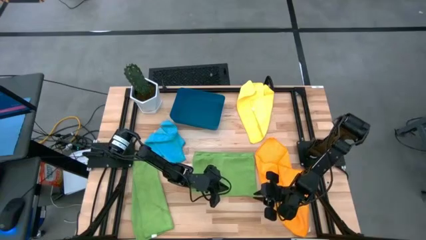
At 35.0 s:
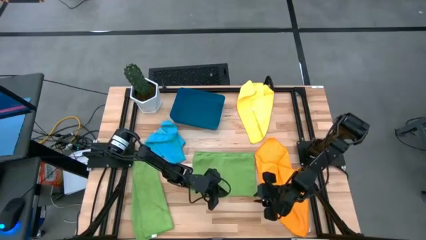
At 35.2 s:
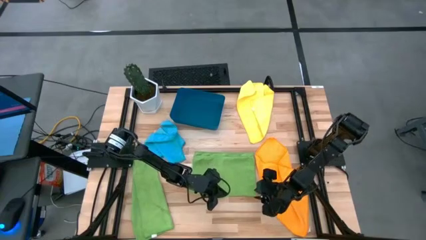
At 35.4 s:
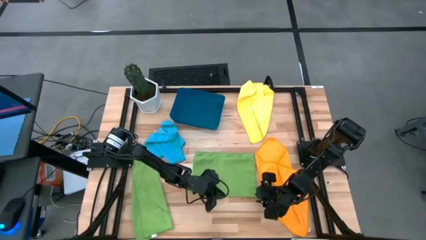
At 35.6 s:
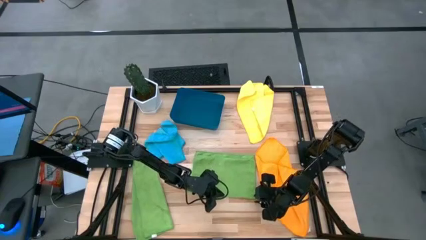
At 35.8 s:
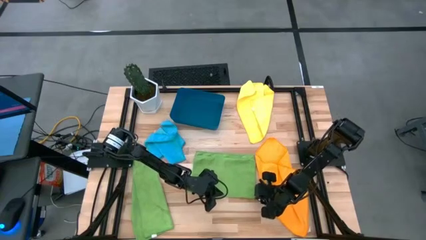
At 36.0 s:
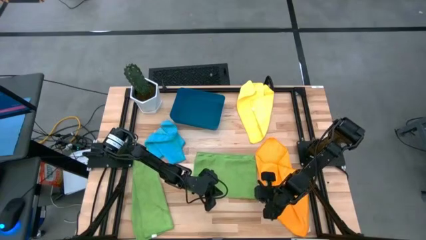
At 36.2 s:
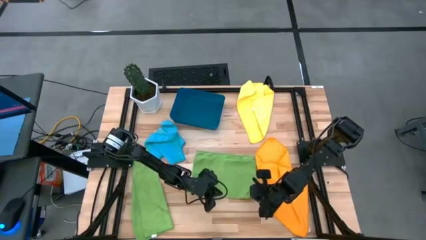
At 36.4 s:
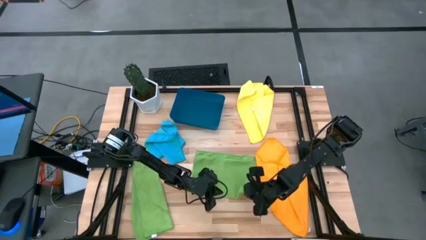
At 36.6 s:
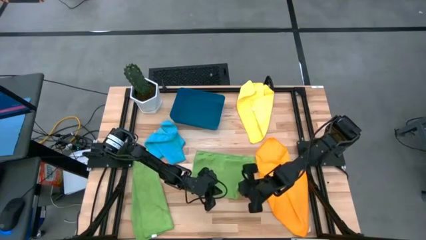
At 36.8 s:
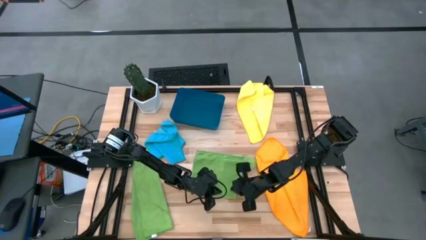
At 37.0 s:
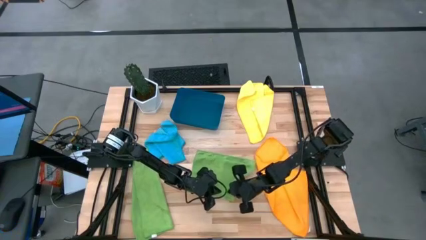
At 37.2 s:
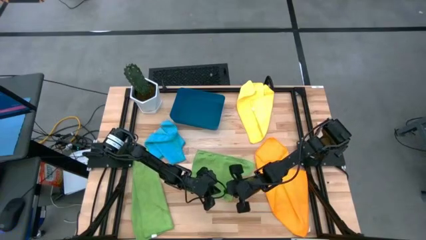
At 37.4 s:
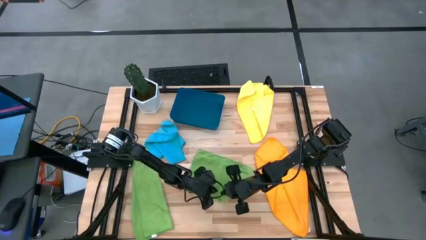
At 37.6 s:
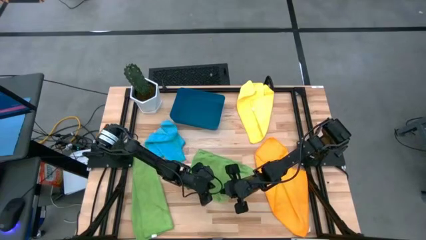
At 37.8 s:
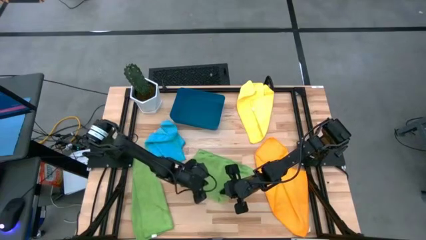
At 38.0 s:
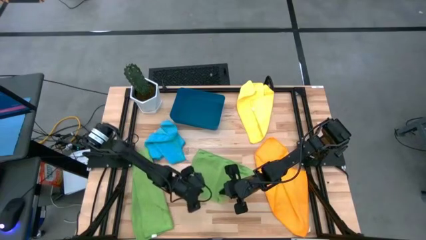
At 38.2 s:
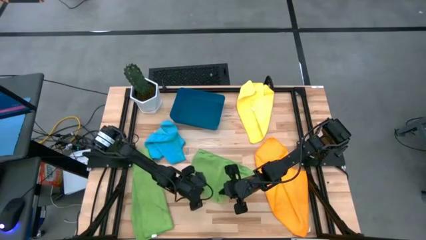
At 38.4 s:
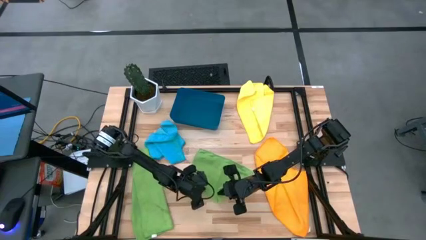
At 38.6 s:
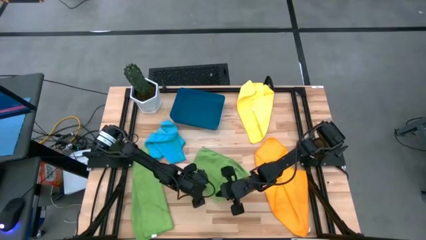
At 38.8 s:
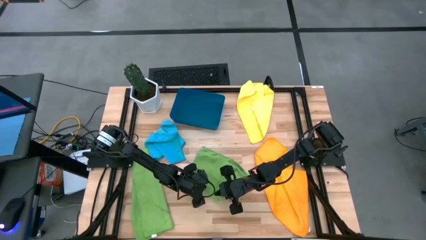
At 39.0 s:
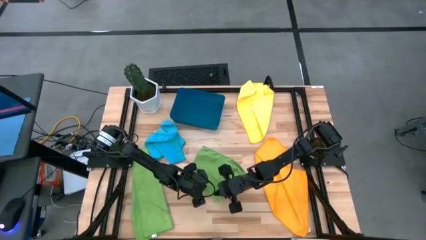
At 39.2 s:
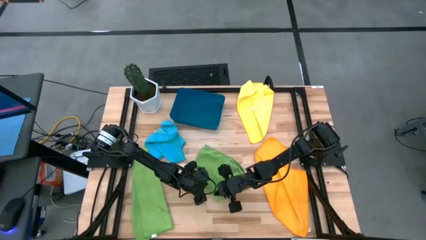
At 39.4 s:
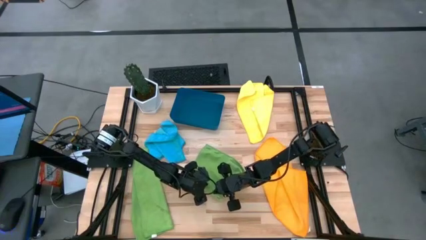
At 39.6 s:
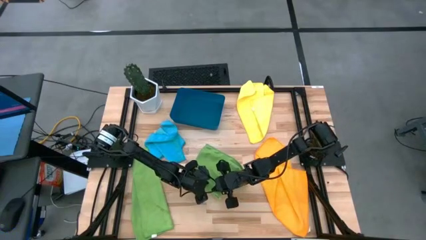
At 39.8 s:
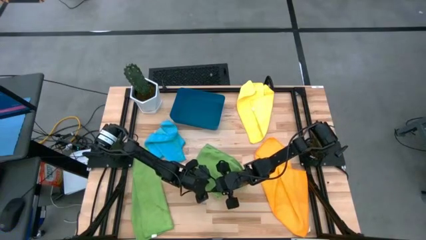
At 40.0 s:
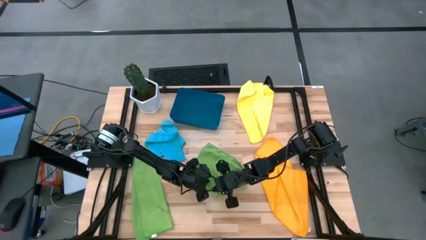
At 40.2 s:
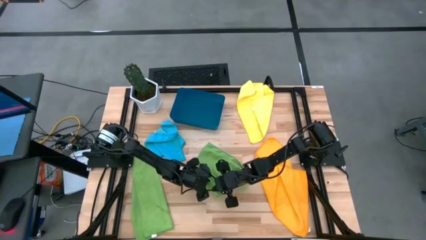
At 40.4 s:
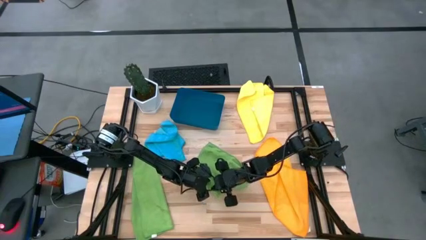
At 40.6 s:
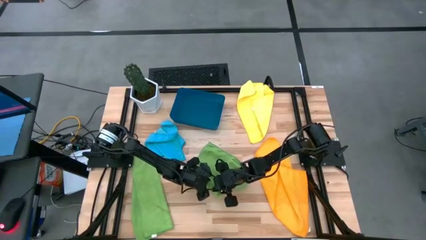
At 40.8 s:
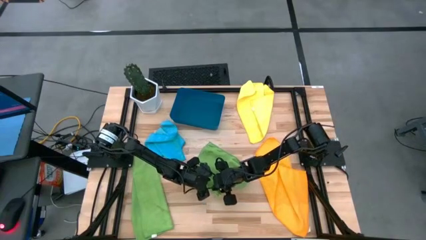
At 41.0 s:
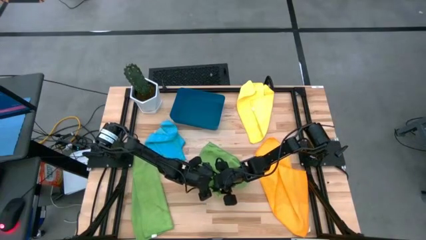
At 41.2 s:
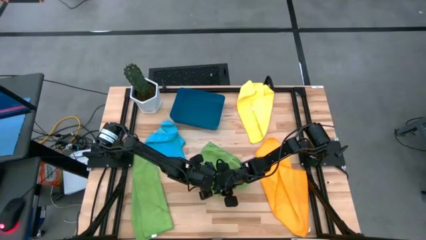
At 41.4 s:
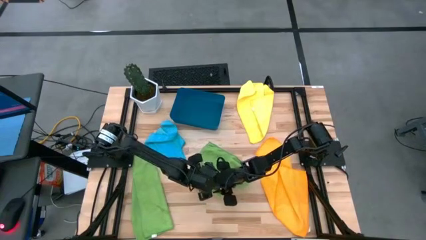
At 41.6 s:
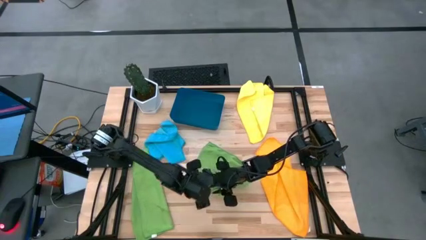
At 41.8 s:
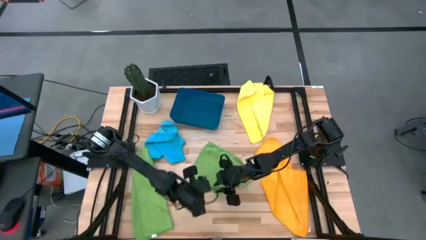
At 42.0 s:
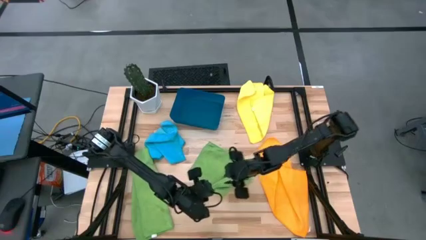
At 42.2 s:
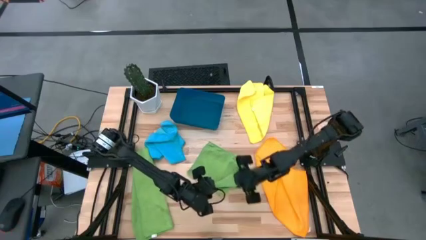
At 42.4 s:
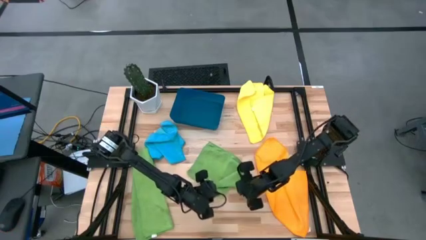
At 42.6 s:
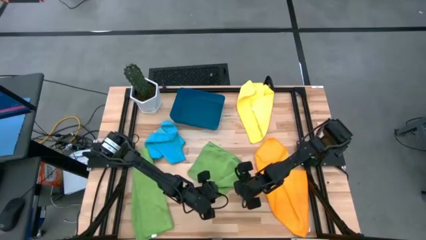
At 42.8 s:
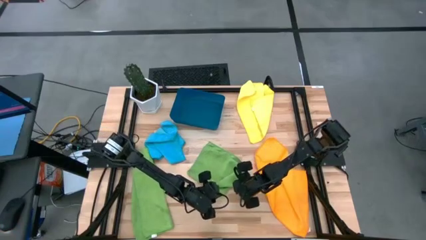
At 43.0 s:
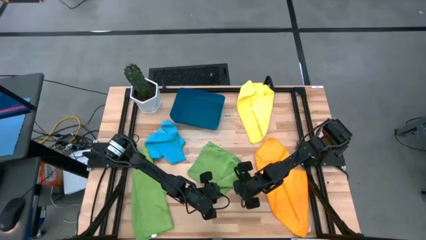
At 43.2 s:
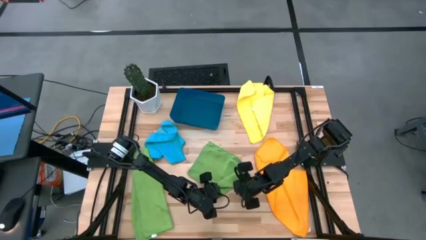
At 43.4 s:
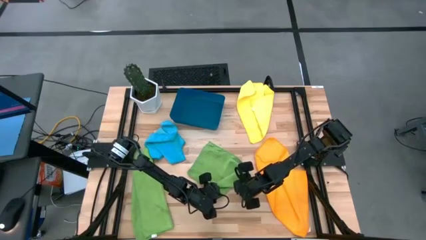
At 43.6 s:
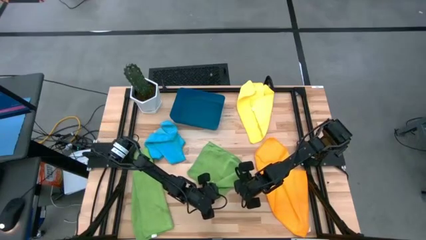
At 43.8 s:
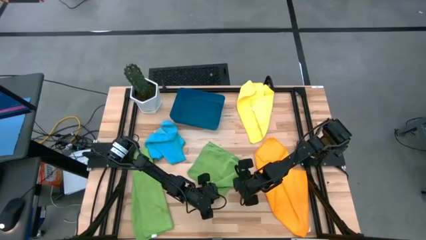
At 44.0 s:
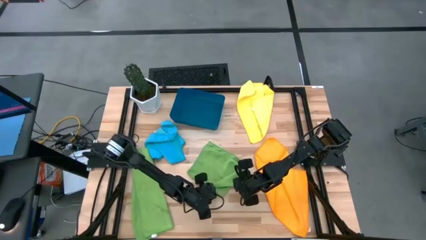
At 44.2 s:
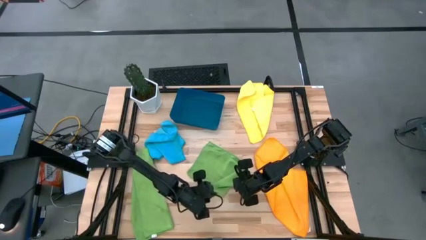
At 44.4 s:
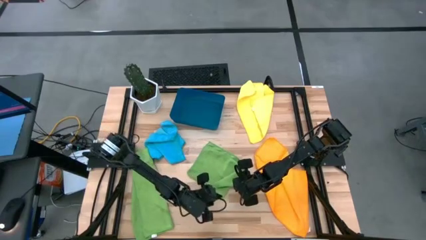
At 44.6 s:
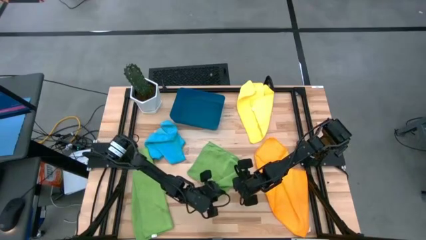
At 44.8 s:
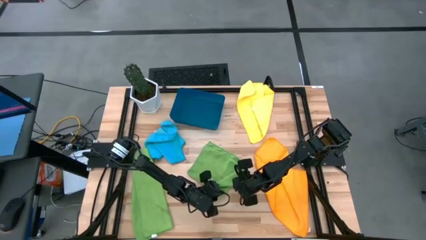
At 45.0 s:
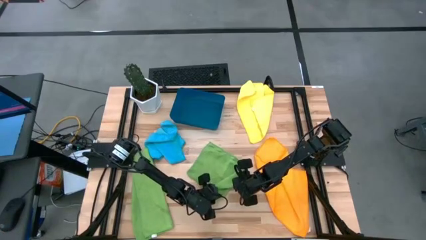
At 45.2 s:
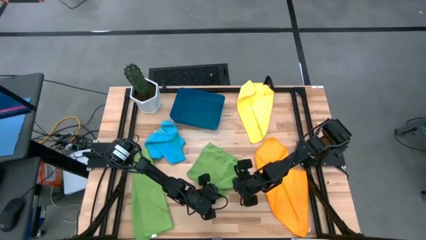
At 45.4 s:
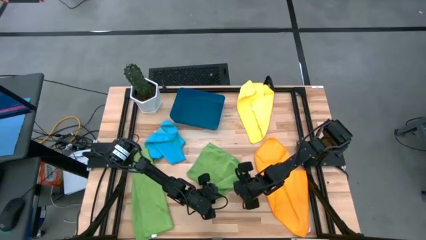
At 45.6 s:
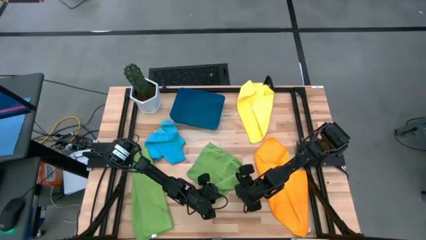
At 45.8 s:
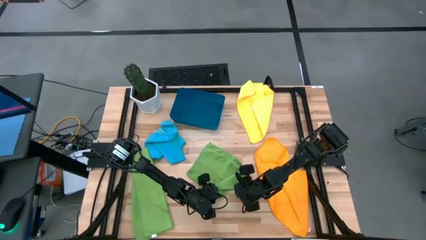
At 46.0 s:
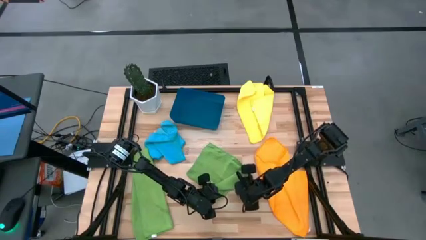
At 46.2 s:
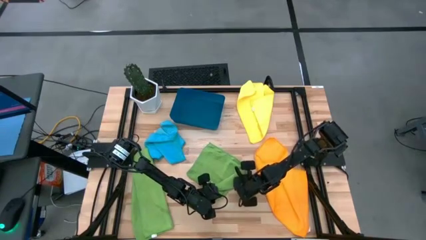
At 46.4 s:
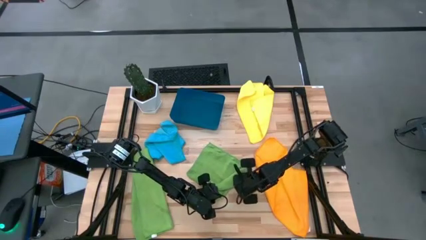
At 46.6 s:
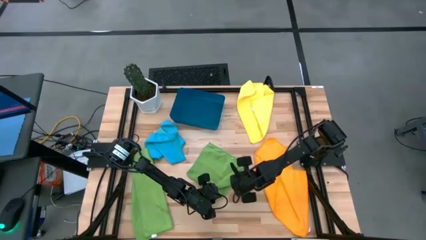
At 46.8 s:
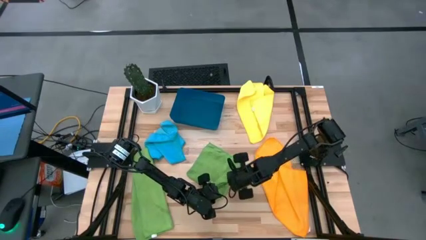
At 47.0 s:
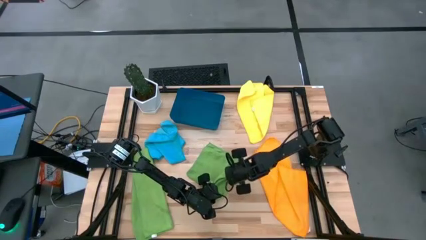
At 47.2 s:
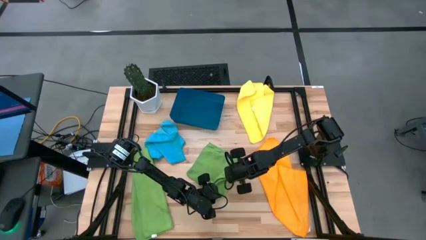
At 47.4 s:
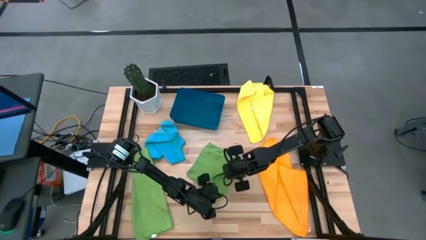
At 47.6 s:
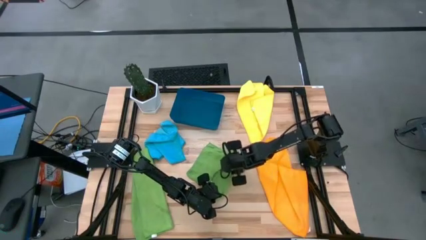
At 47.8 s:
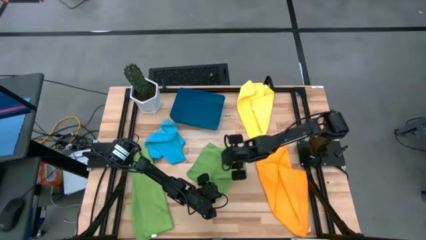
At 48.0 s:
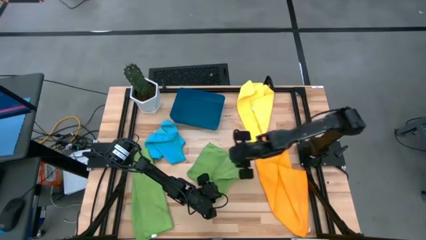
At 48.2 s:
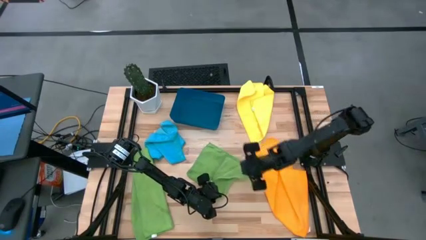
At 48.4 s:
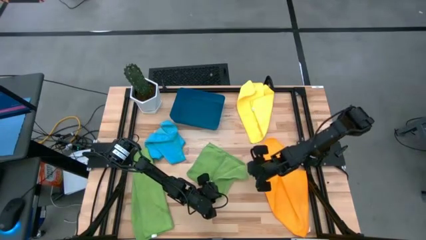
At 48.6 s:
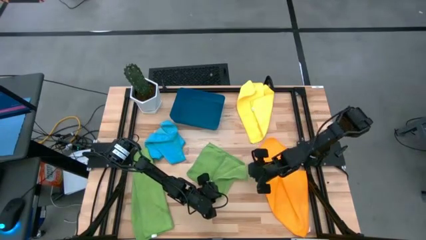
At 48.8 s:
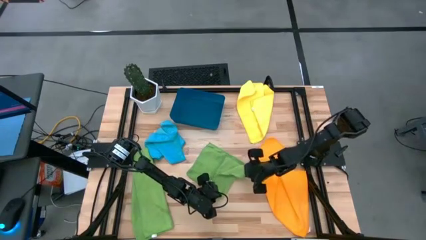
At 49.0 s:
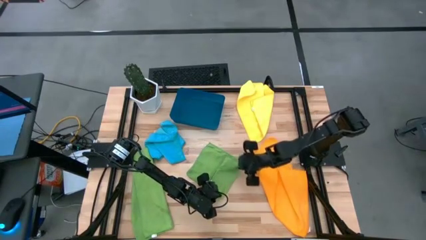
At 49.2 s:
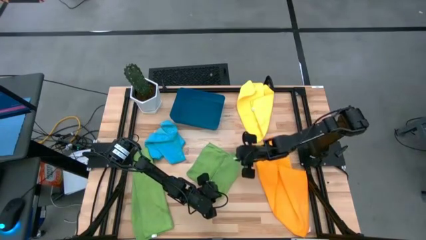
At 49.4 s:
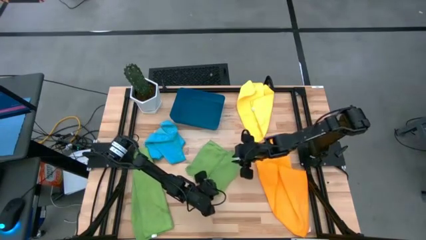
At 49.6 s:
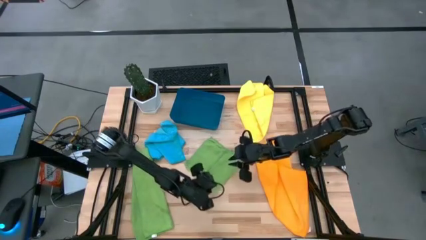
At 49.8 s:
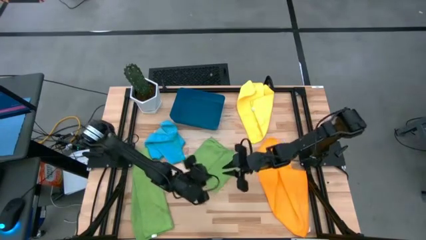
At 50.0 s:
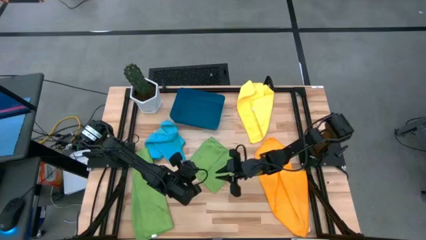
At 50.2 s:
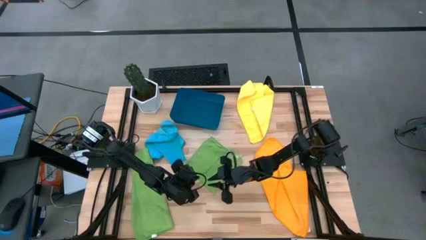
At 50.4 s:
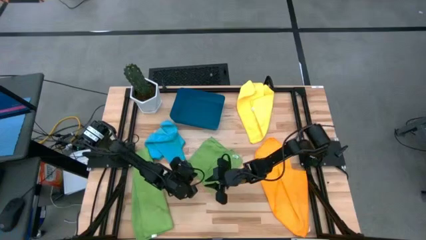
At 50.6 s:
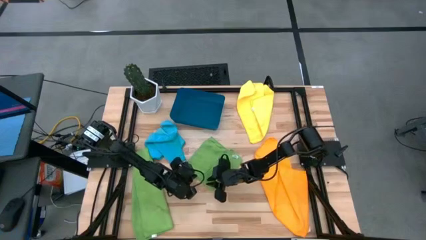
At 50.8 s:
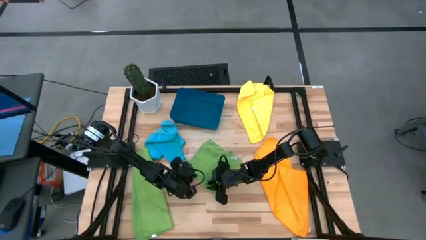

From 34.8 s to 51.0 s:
Task: Fold microfiber towels
Fold the right green towel
